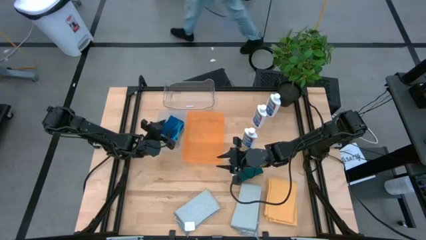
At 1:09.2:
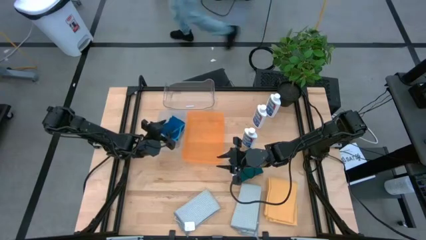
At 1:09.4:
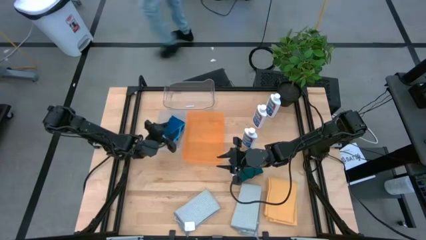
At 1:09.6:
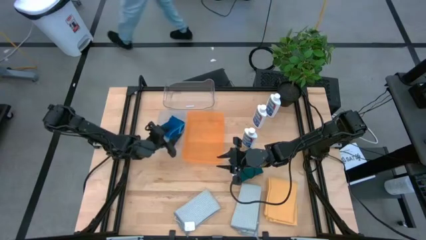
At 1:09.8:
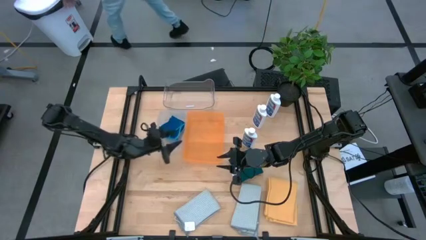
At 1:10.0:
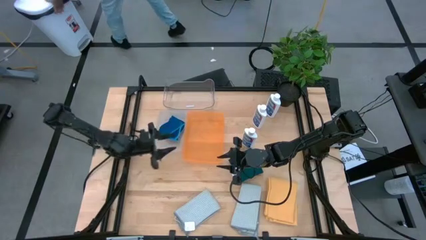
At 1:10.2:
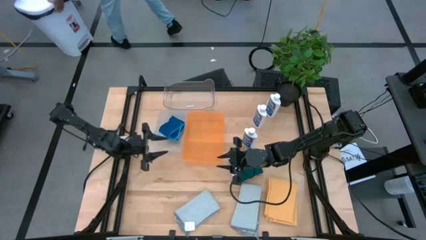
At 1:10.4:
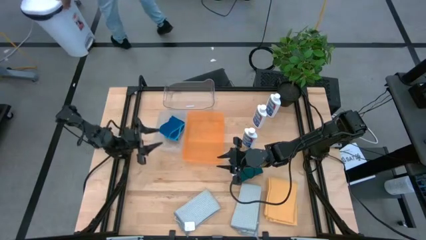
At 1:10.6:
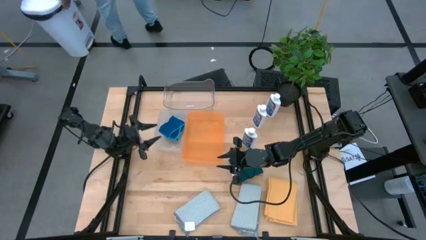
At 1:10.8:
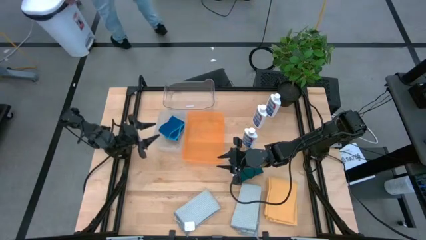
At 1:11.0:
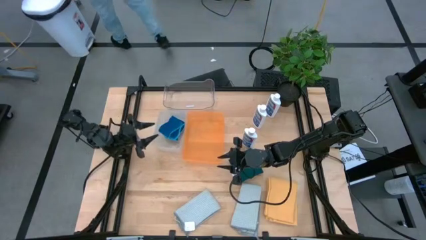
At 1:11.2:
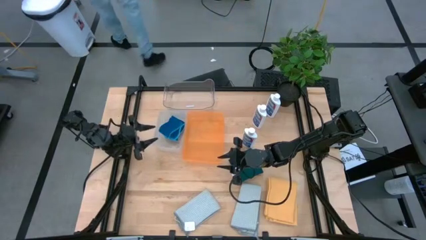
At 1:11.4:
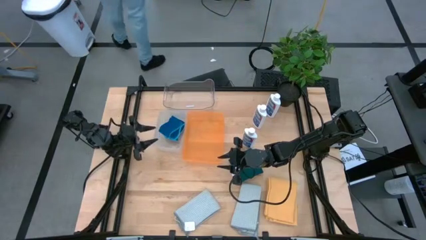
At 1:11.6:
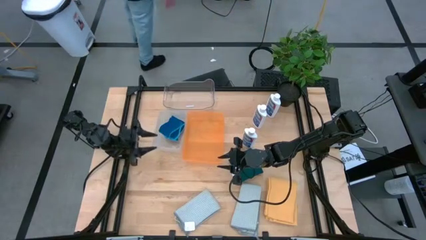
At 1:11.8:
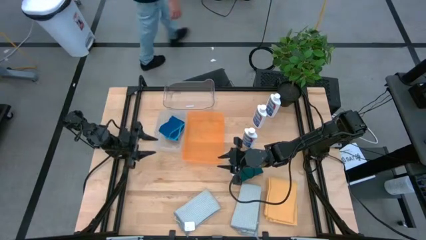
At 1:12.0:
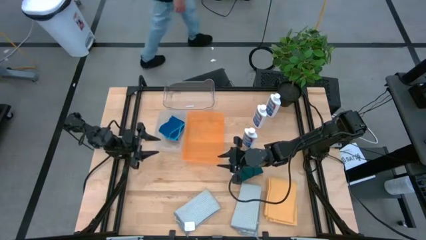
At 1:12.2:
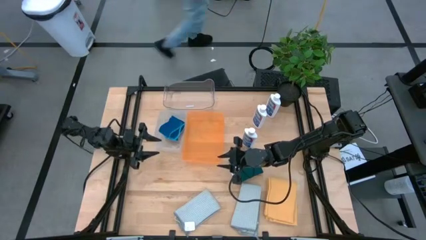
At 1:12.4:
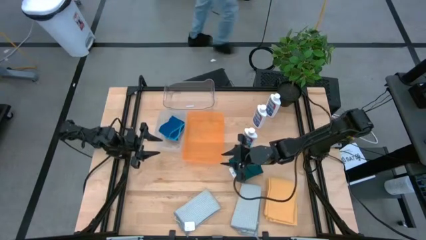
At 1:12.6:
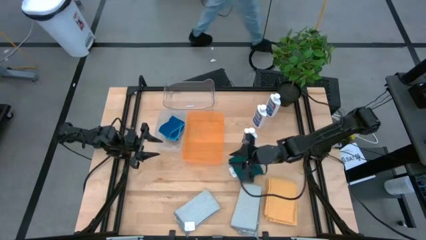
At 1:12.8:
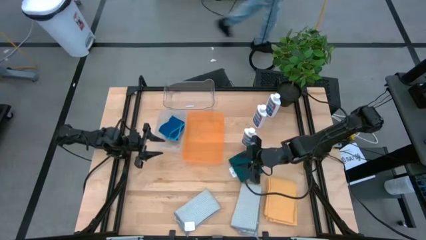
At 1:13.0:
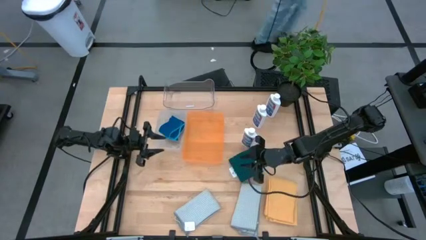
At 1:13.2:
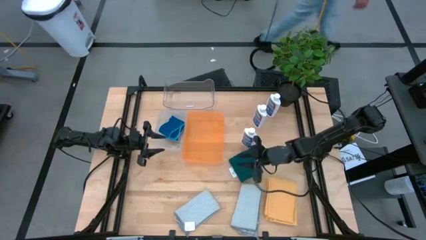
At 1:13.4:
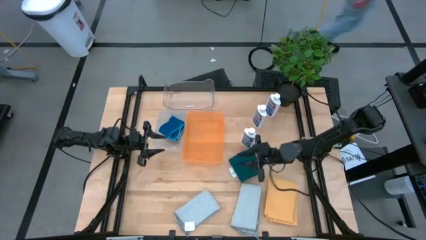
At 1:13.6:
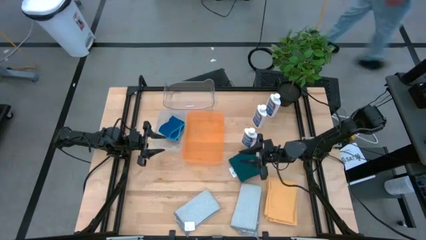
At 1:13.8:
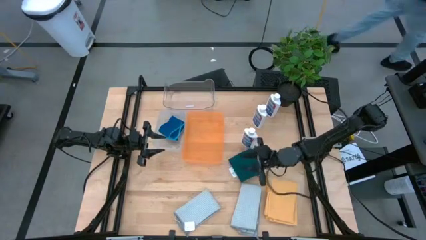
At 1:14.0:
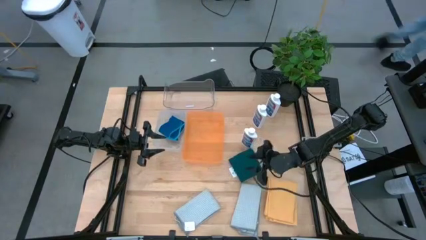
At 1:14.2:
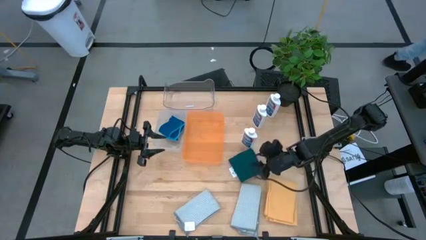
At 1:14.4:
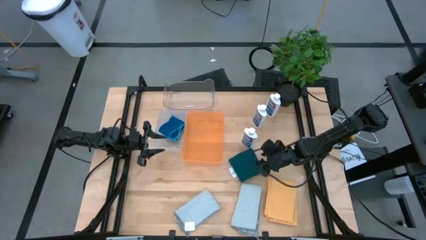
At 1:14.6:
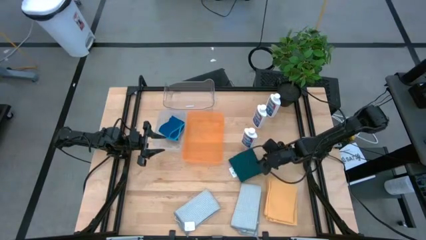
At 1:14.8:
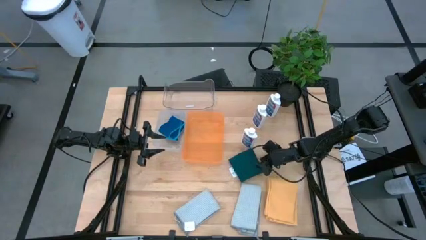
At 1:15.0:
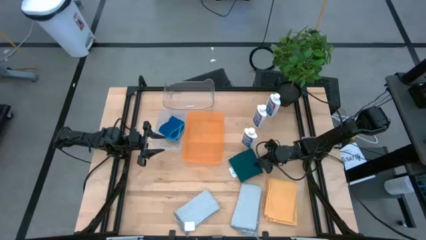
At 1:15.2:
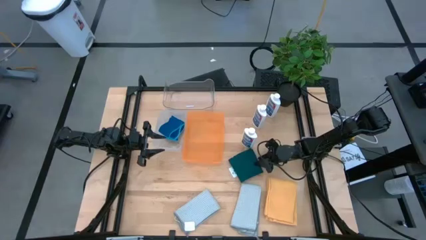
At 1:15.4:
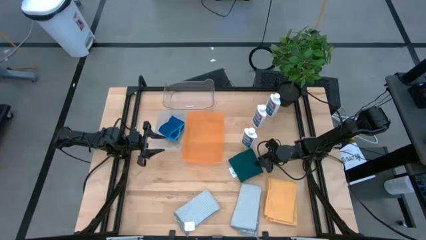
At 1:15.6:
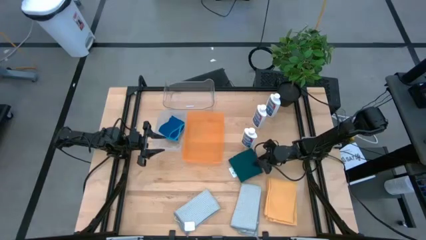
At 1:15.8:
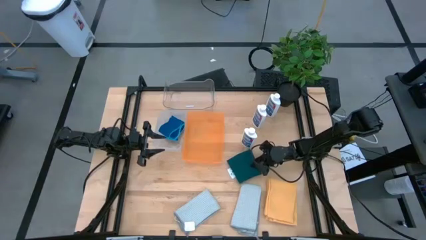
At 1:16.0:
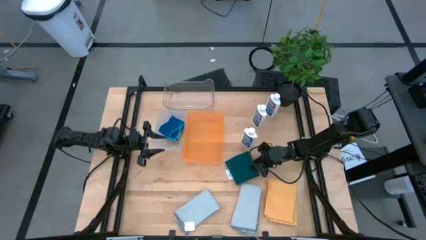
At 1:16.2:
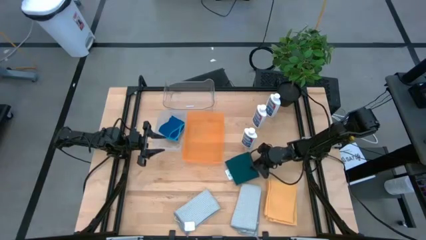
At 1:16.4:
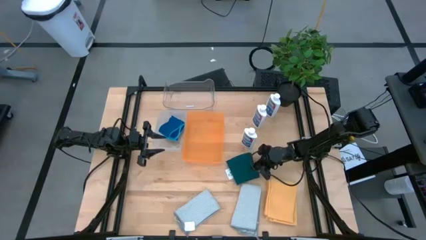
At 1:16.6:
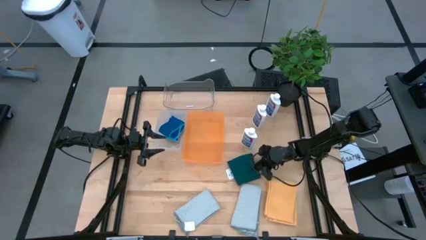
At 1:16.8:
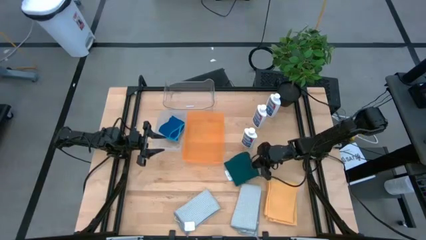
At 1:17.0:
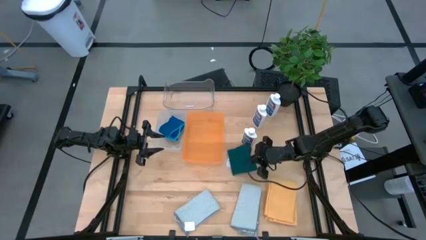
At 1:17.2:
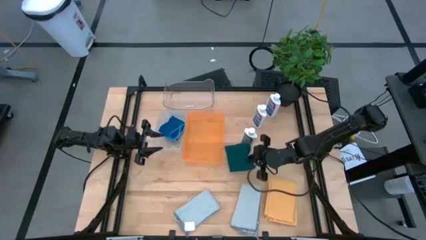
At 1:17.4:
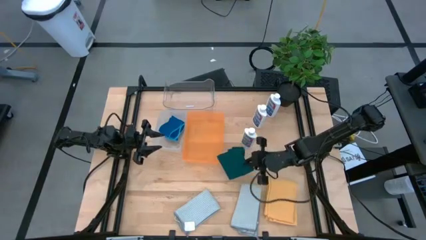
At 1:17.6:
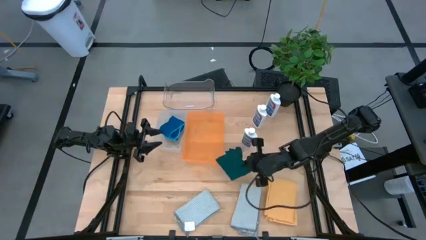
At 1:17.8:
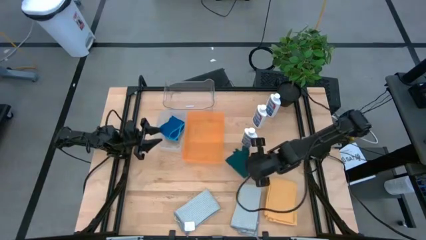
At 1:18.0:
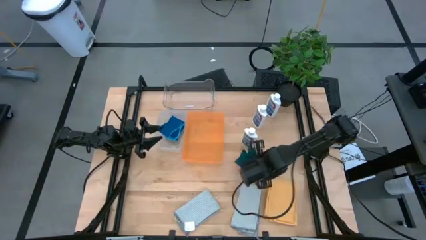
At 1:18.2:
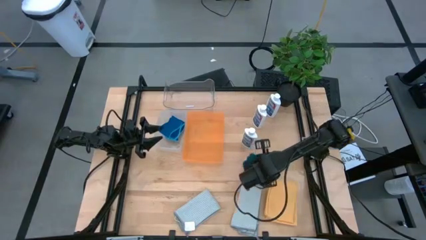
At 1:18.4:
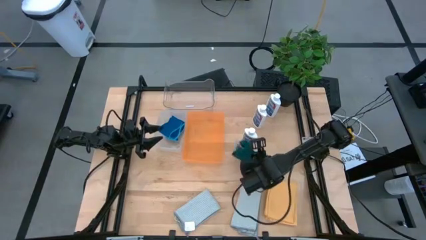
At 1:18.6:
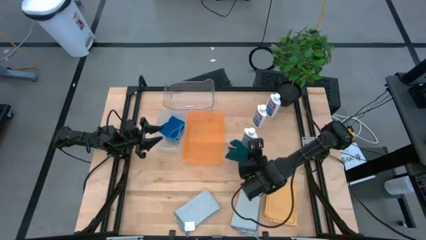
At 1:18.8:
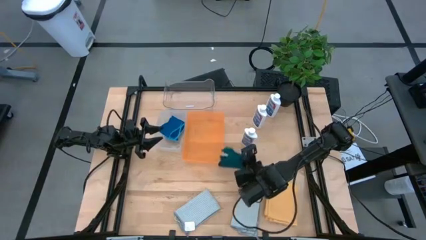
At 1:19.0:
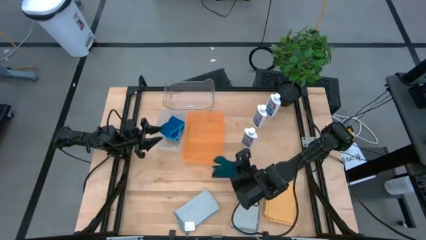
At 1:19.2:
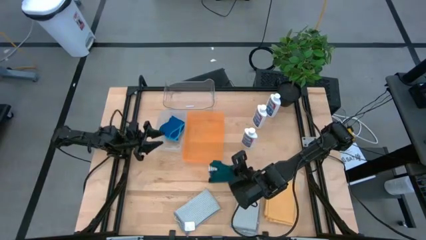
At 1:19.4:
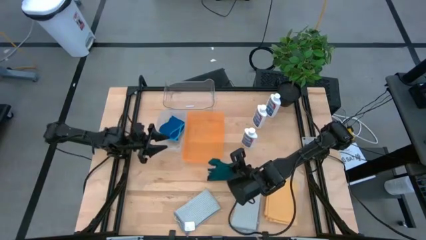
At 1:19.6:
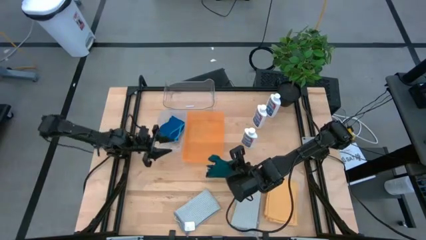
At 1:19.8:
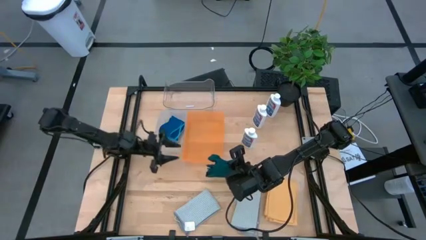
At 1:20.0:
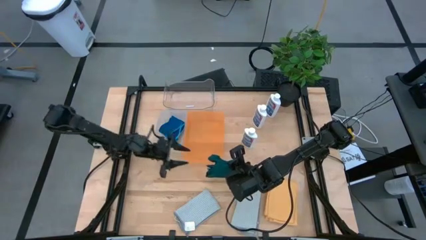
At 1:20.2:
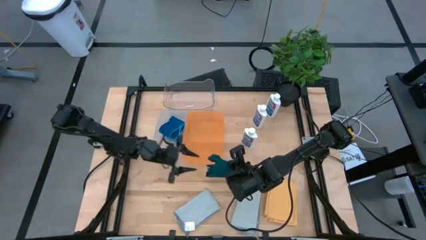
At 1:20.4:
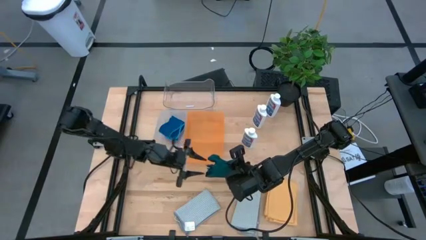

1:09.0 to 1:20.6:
Task: Pick & Place Kitchen Items
Put the green towel into the orange bin
